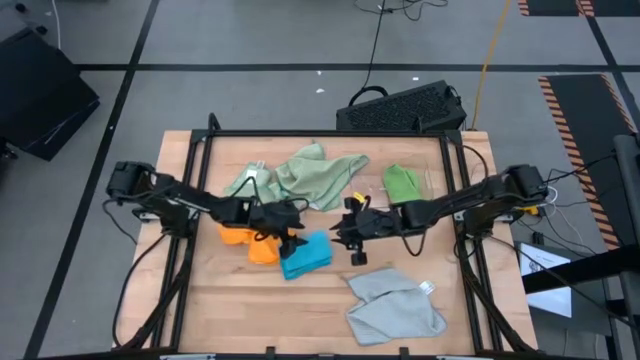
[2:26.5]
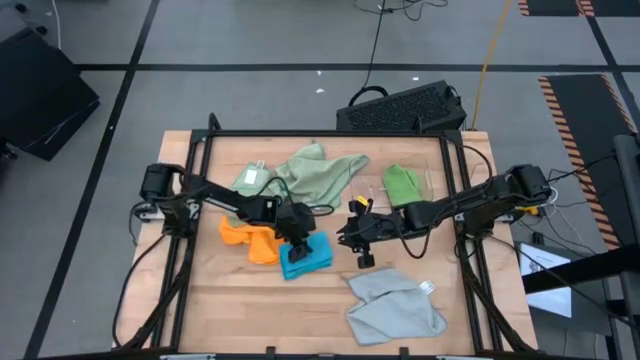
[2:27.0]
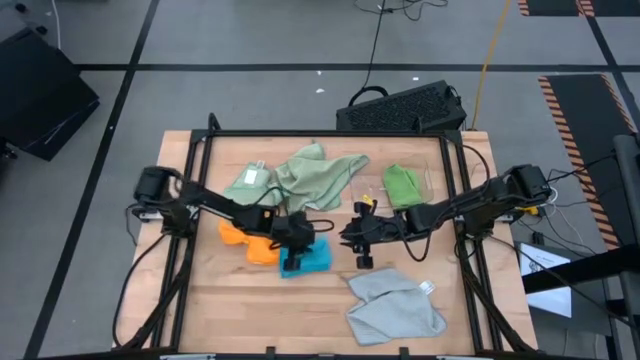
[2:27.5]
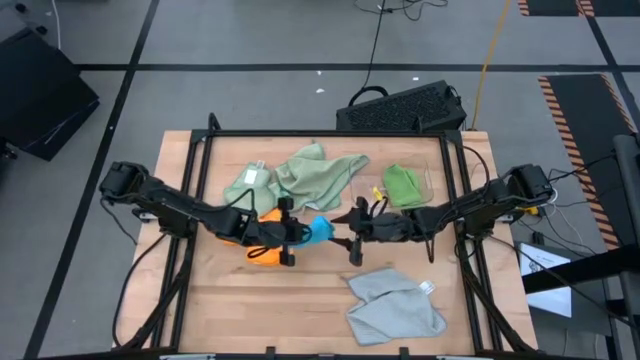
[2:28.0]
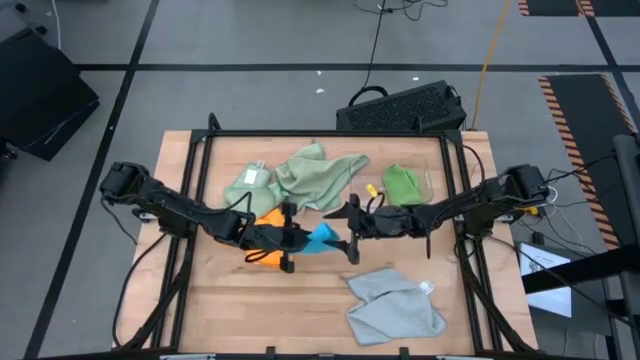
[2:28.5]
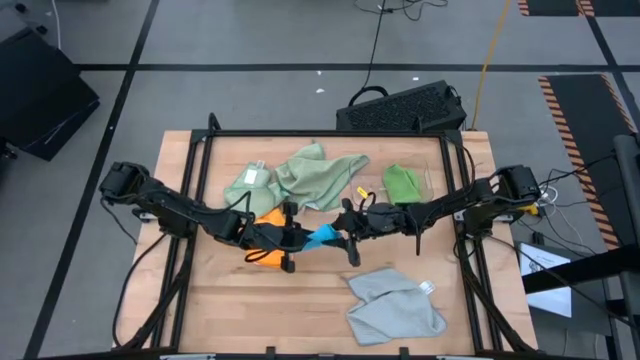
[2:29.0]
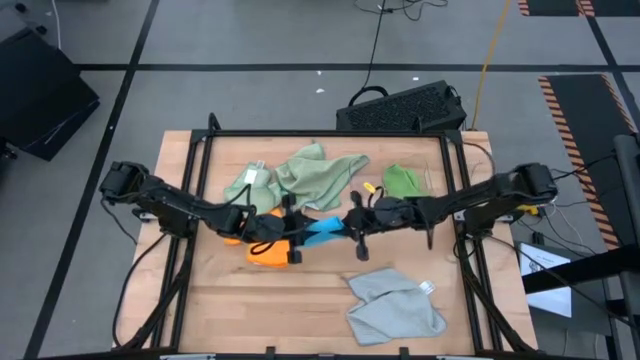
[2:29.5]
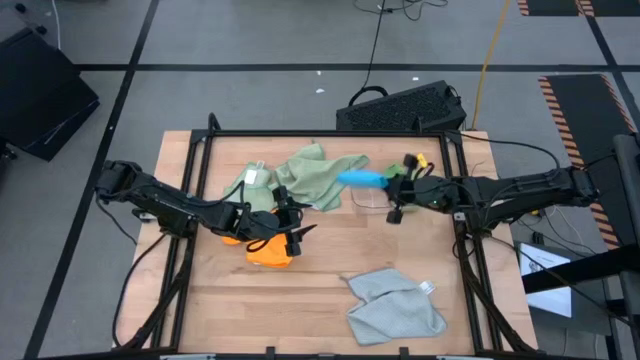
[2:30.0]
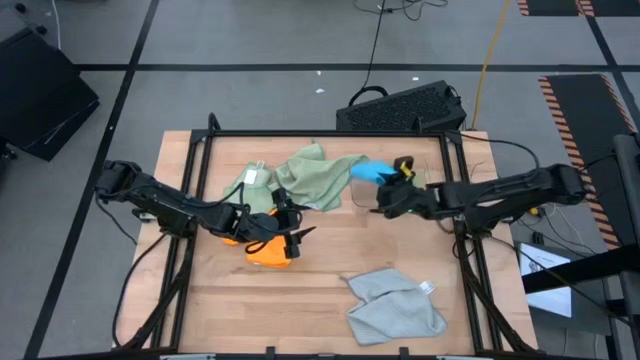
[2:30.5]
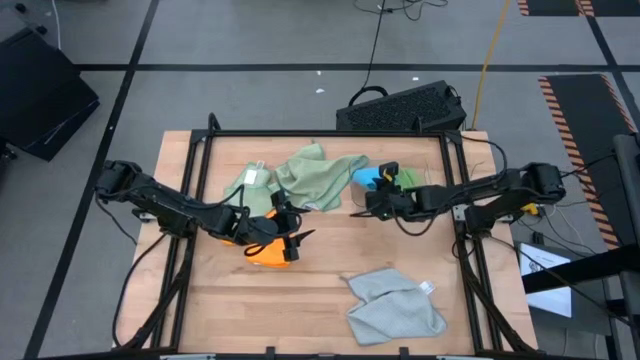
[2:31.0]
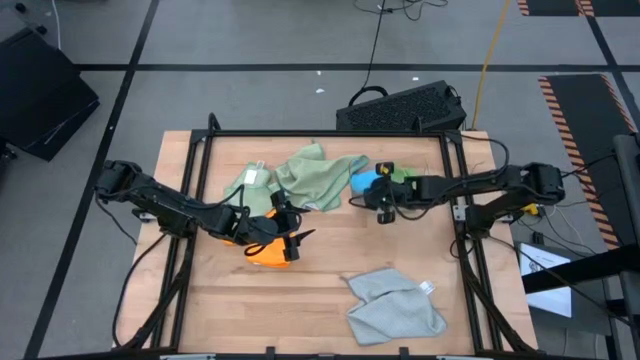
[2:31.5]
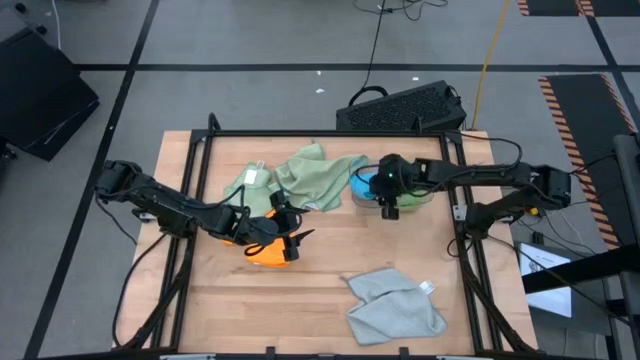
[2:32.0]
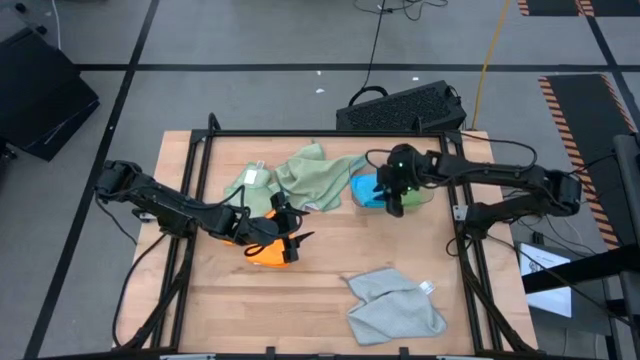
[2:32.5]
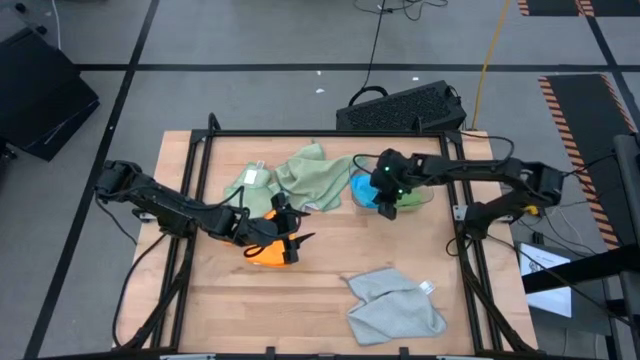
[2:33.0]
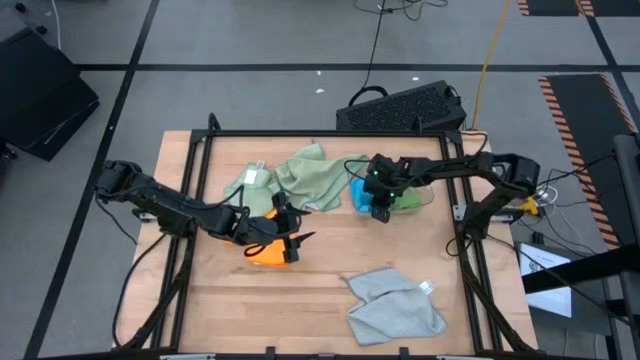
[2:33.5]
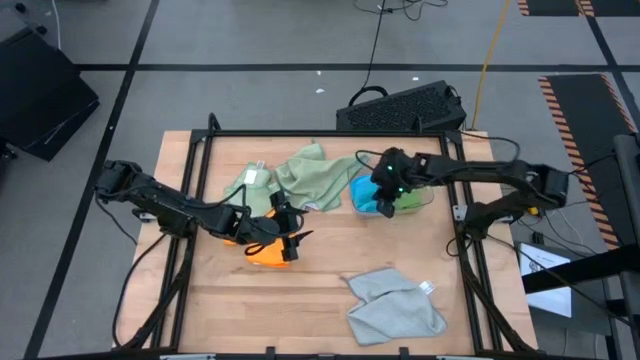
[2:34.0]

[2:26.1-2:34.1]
Task: Fold microfiber towels
Put the folded blue microfiber cloth into the transparent bin

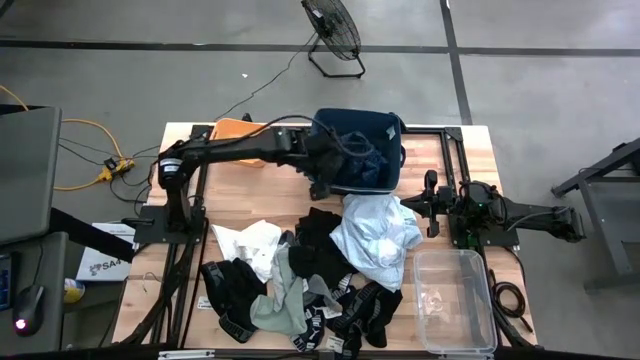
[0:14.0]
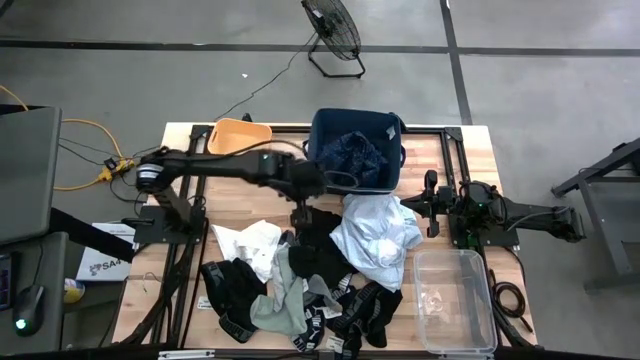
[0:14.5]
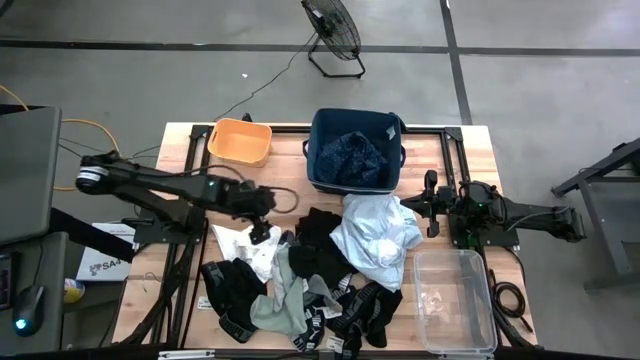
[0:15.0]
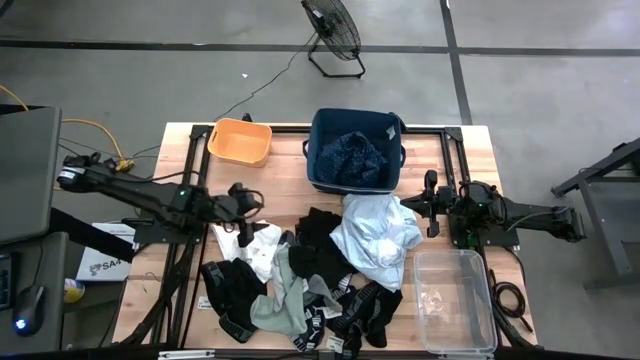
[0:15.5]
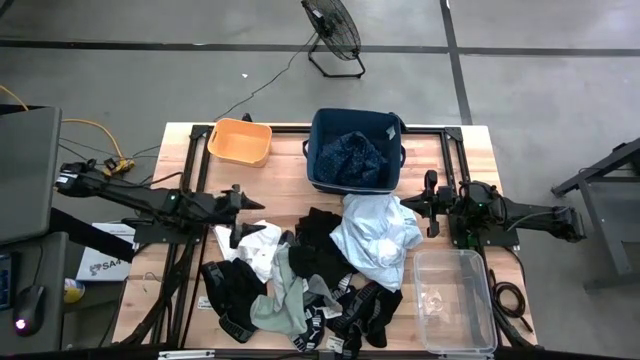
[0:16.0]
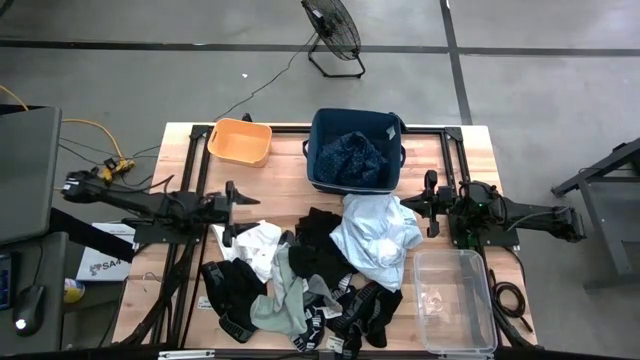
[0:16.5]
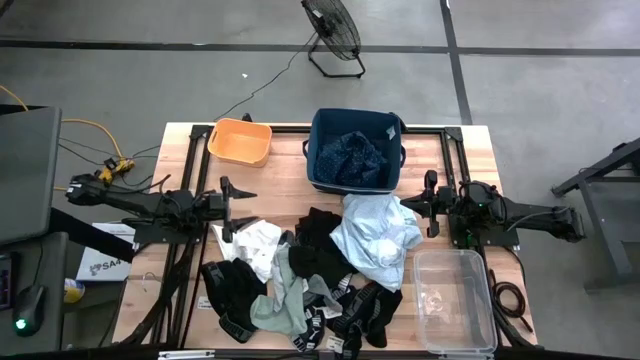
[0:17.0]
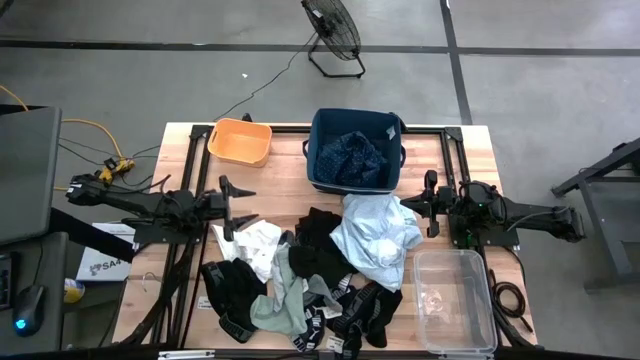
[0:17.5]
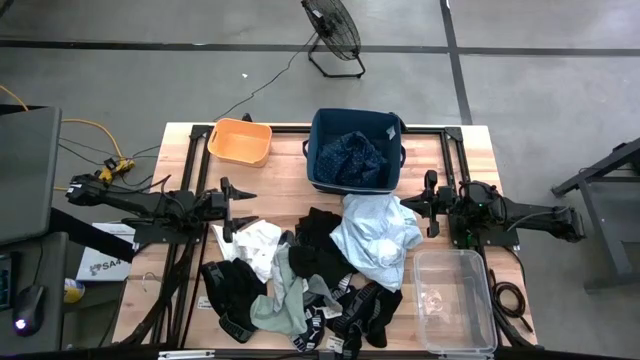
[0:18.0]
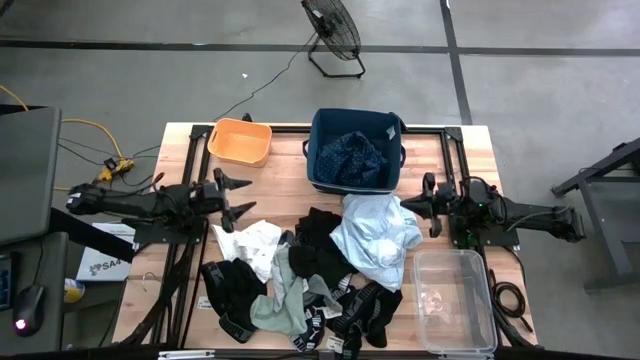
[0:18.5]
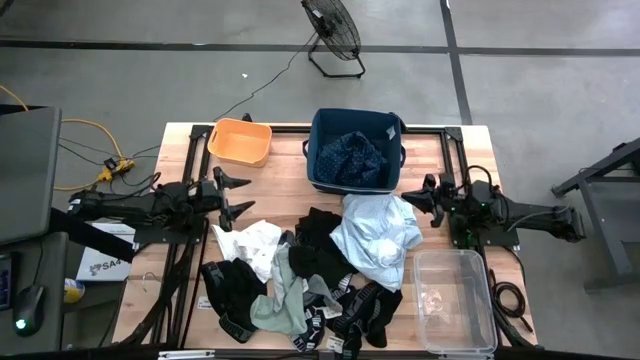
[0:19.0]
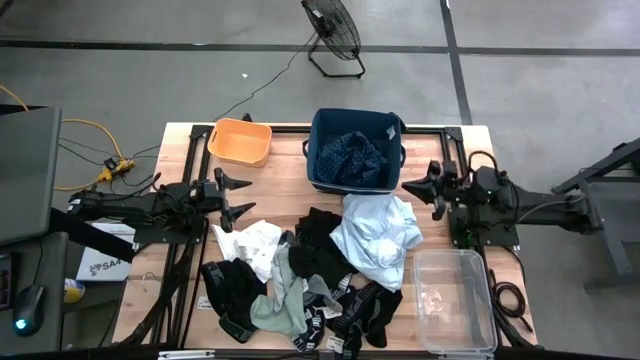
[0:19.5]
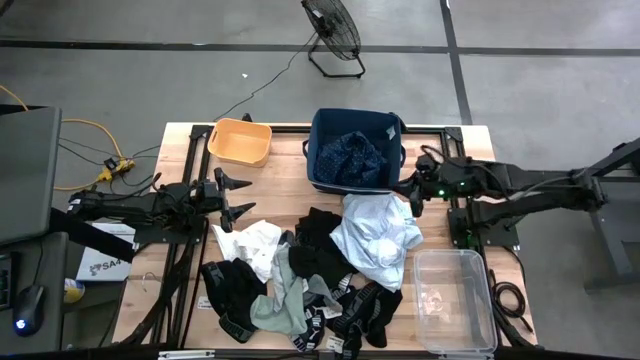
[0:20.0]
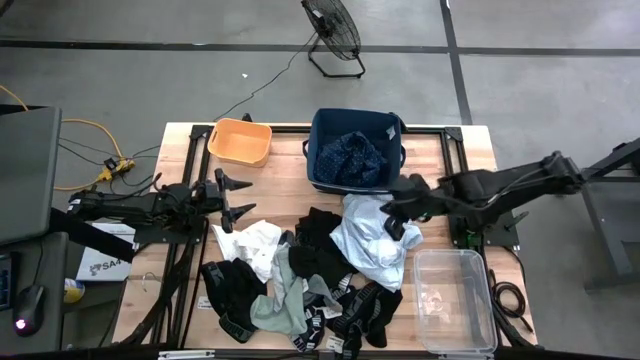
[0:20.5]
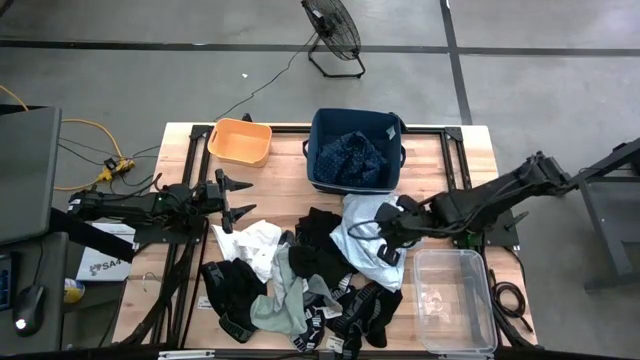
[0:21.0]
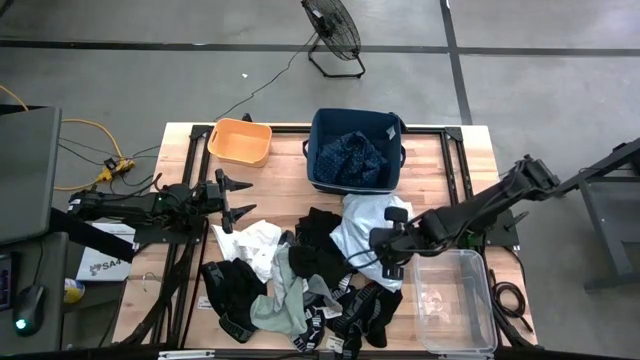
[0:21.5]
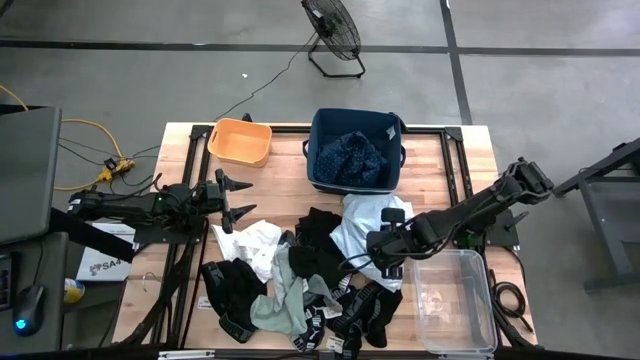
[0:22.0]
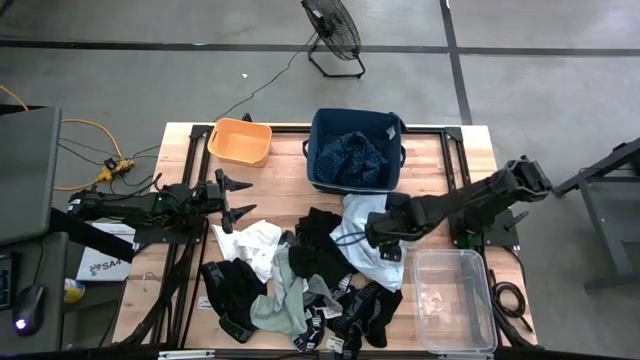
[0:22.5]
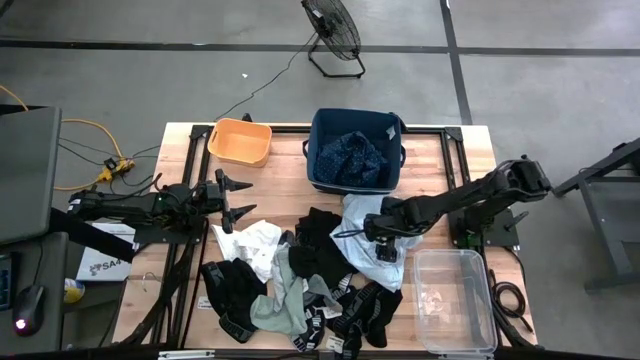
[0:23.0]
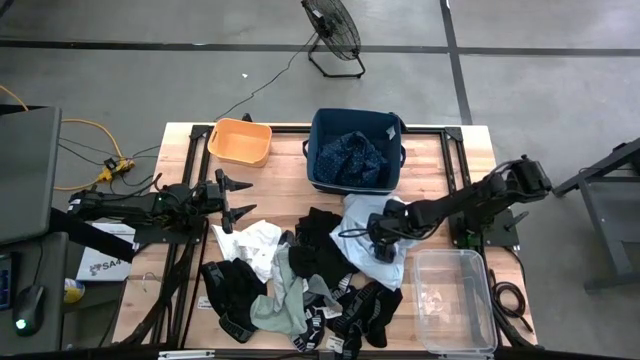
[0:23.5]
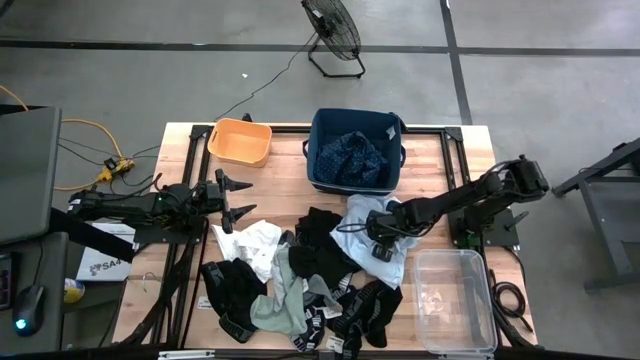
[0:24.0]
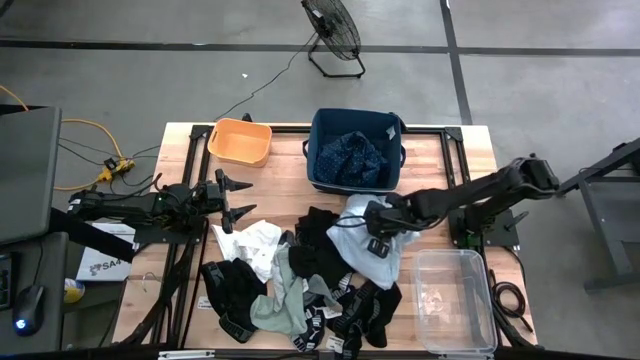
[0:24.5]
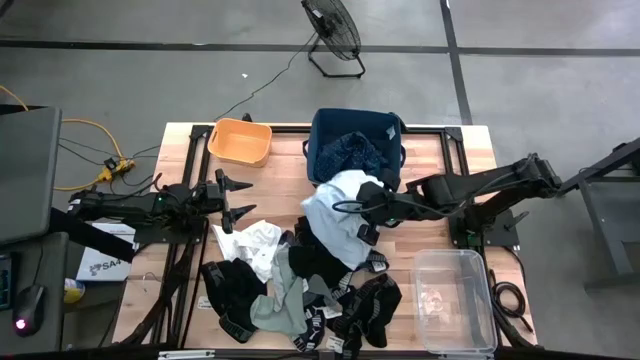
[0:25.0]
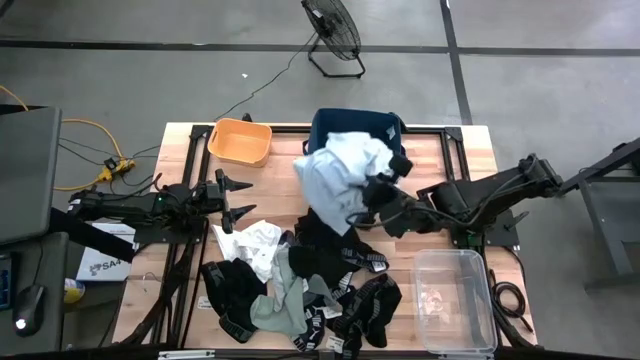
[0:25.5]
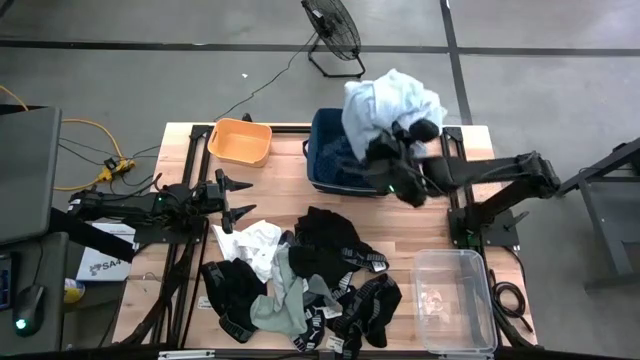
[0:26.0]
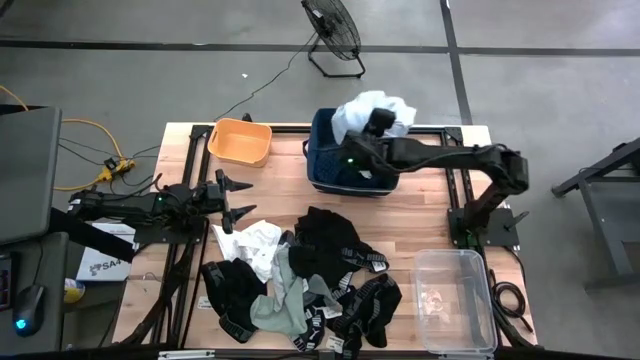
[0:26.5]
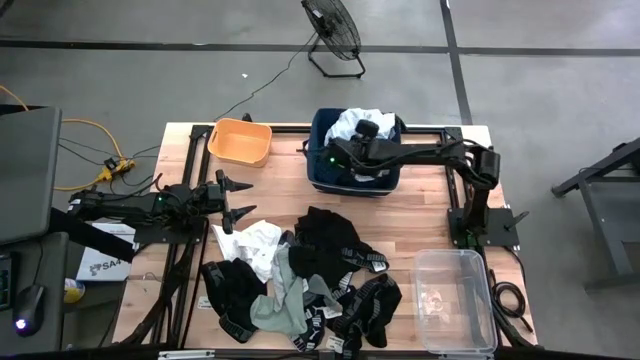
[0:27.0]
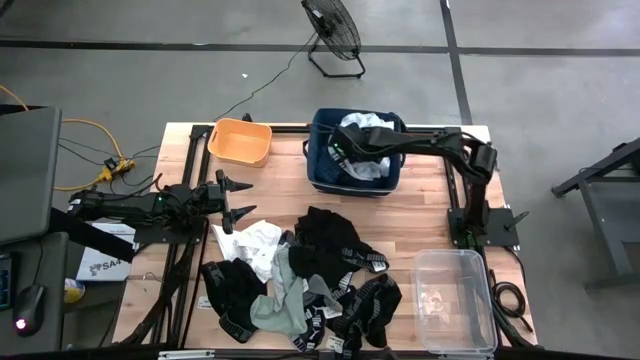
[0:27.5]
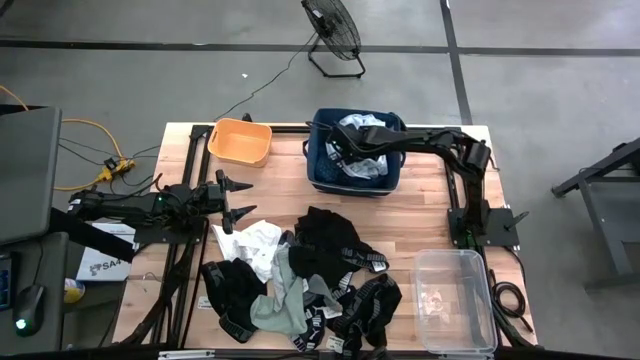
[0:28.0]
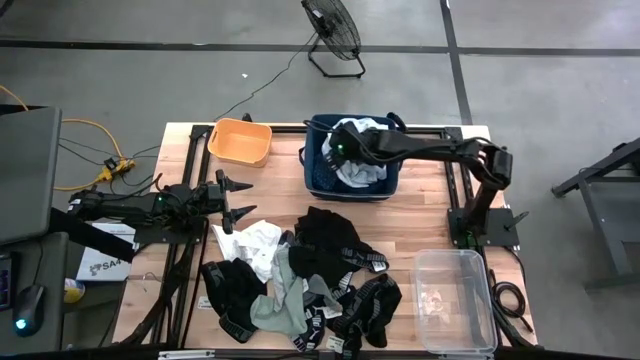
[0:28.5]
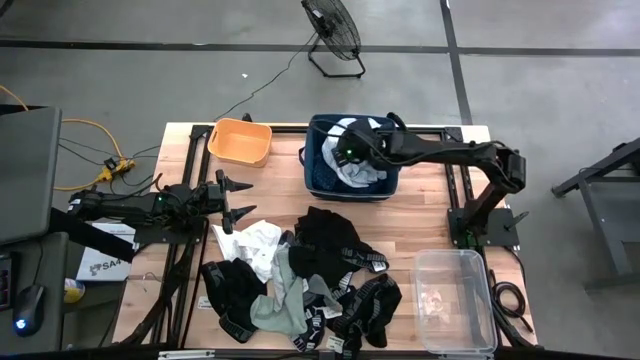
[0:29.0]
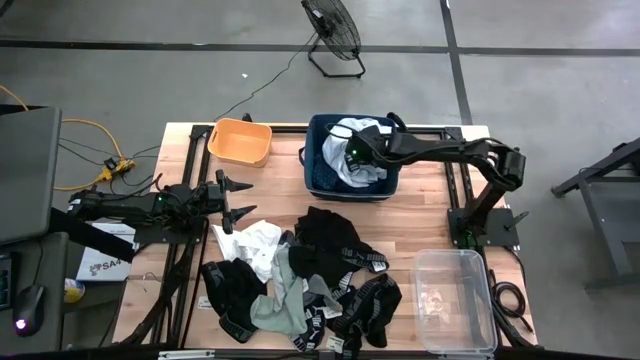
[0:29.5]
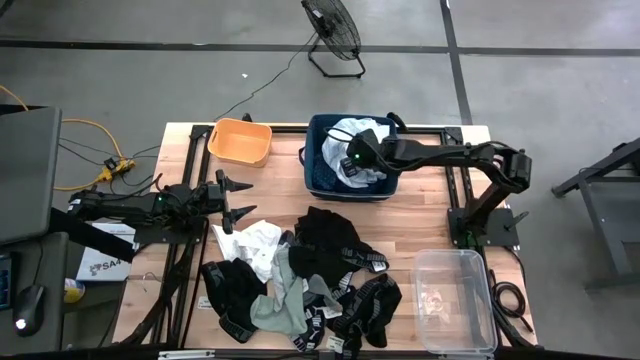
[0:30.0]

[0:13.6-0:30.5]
Task: Pick & Place Cloths
Put the light blue shirt into the blue laundry bin
